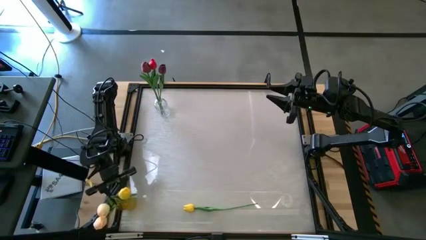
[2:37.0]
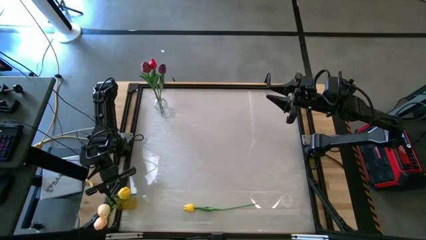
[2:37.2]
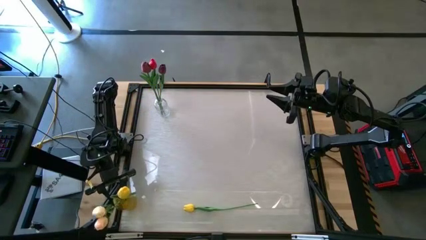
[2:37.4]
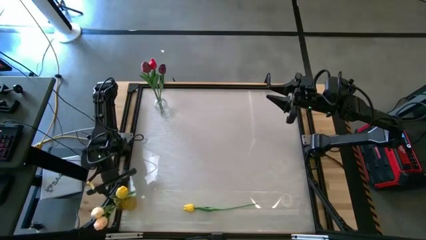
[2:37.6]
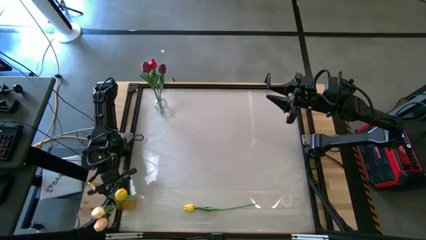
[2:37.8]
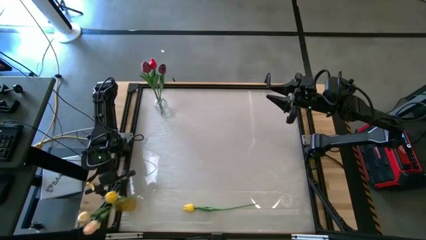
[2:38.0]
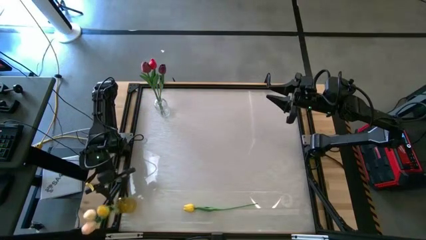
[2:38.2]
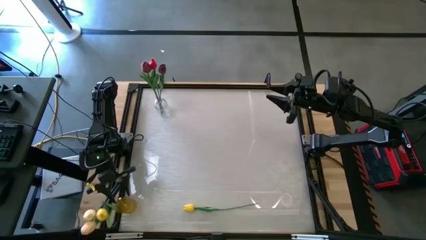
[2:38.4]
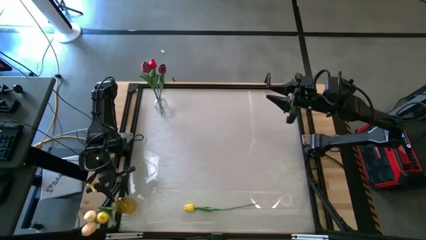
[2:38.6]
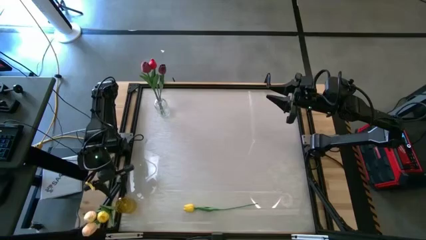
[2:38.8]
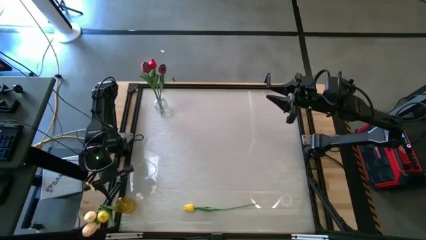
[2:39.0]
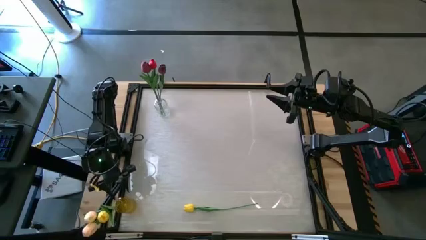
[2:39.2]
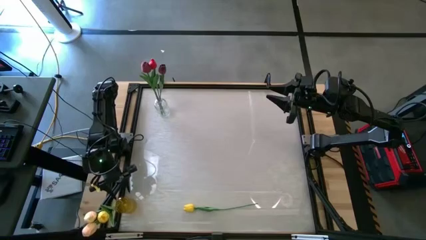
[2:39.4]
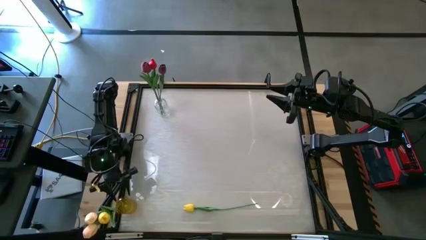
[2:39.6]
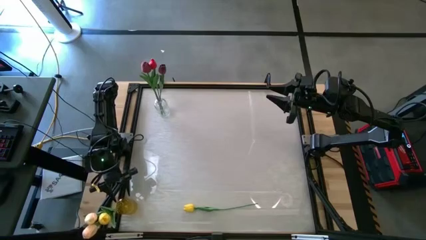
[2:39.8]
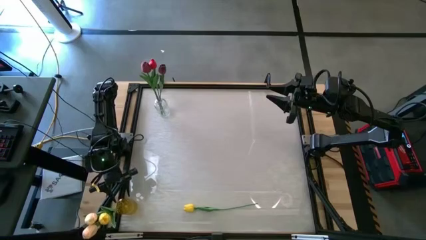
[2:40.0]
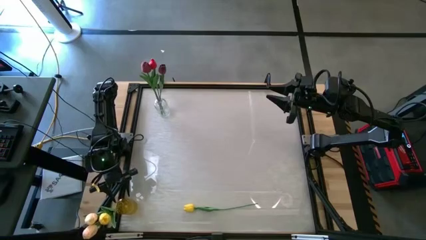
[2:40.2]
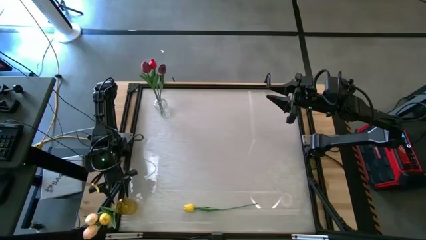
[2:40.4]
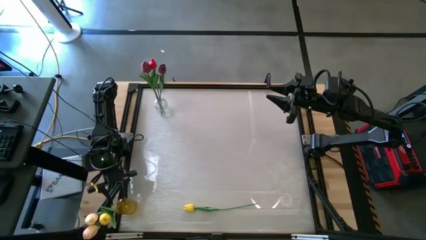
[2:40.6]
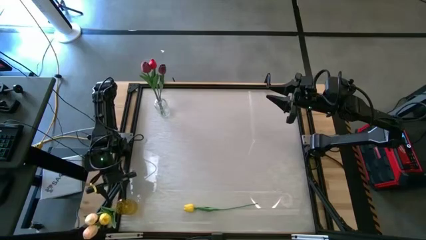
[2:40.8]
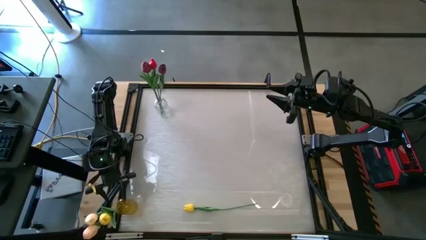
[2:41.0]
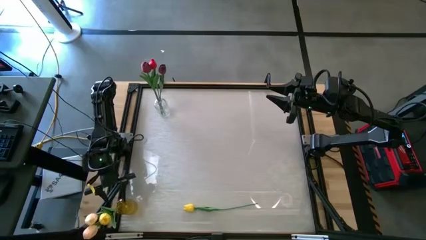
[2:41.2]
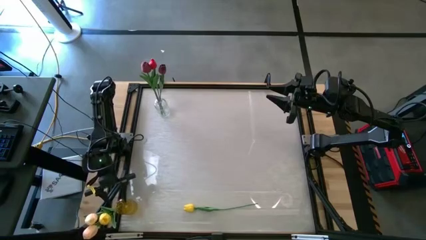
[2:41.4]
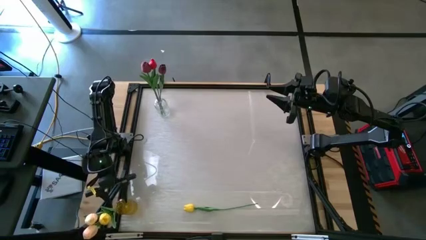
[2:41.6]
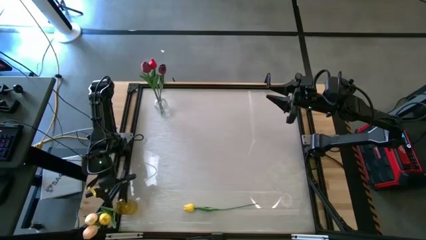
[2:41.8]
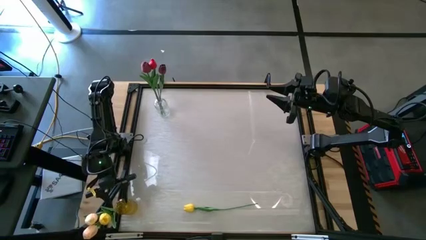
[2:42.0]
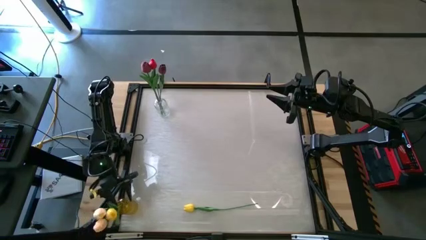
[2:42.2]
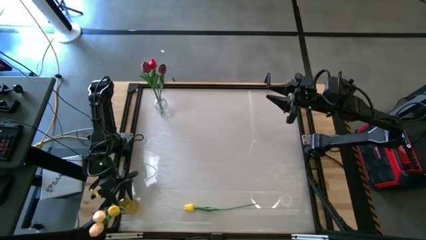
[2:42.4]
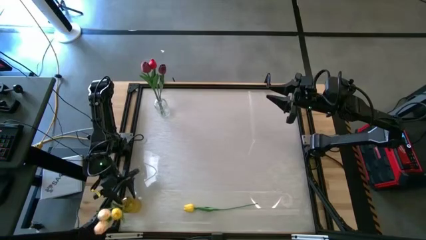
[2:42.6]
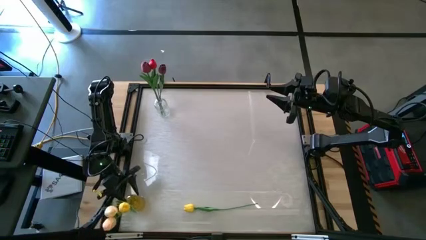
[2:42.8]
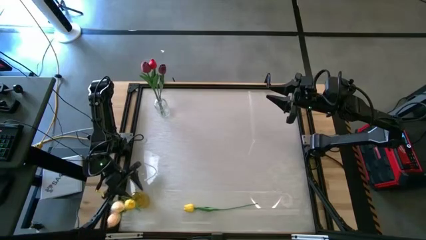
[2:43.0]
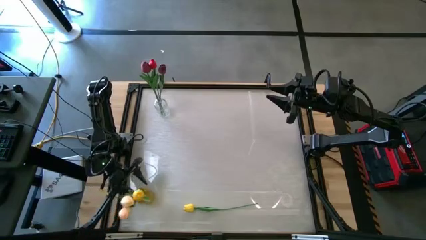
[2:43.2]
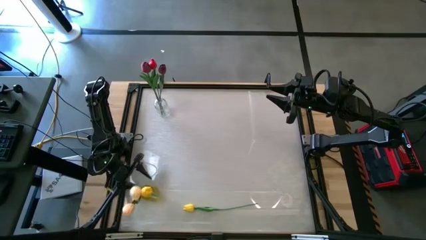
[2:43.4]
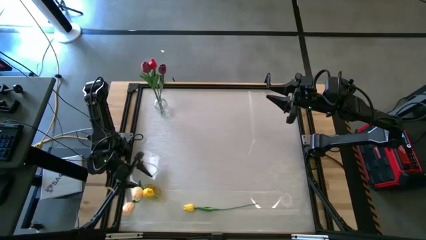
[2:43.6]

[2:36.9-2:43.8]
Task: Sort flowers into vase by color
Adjust the yellow vase

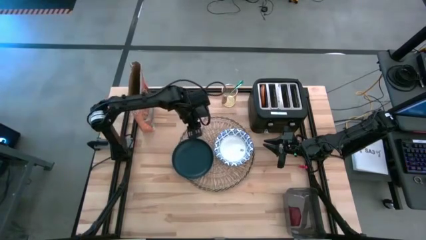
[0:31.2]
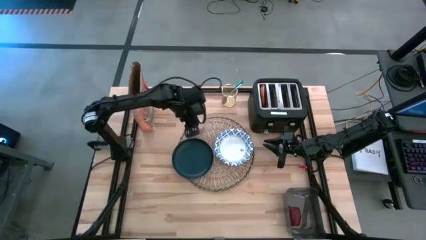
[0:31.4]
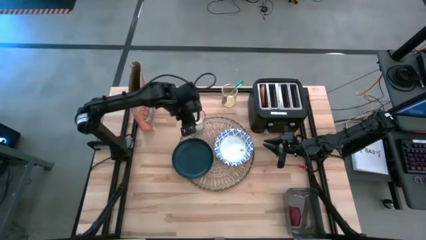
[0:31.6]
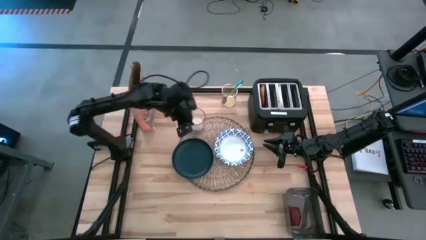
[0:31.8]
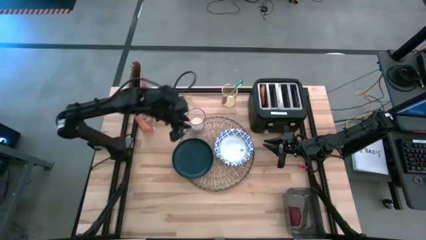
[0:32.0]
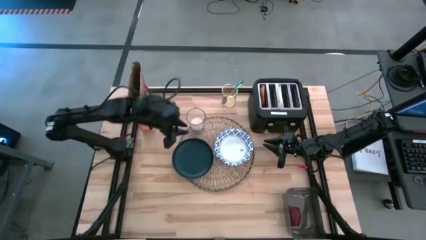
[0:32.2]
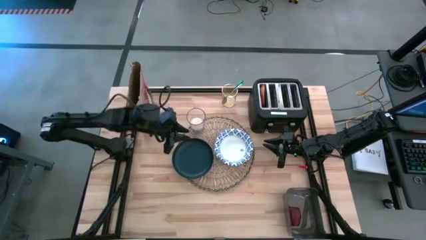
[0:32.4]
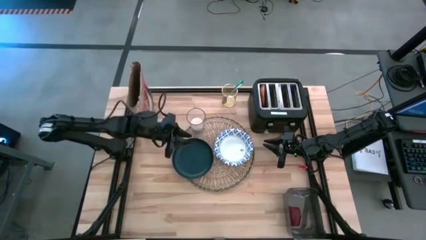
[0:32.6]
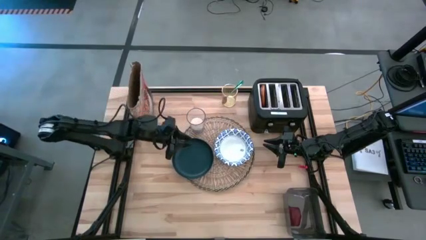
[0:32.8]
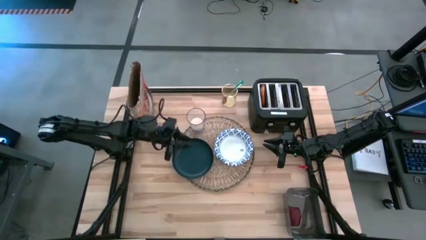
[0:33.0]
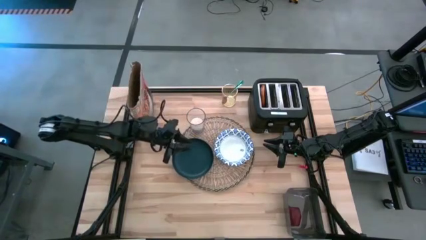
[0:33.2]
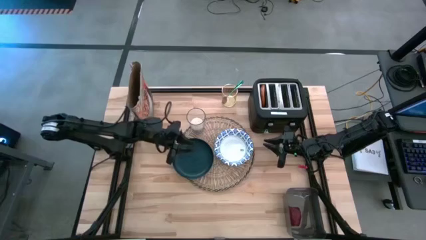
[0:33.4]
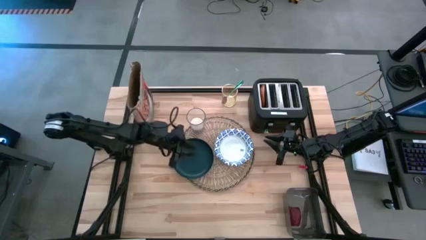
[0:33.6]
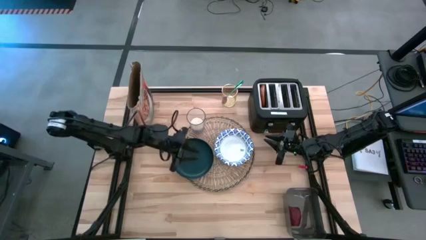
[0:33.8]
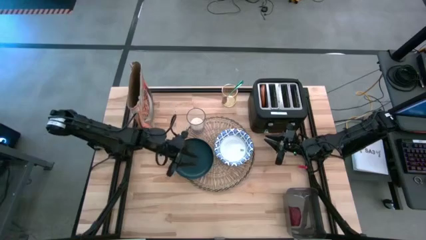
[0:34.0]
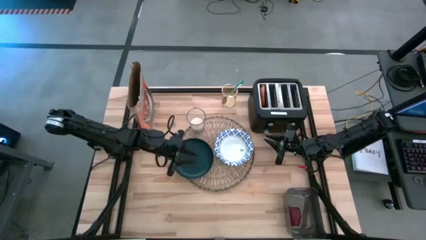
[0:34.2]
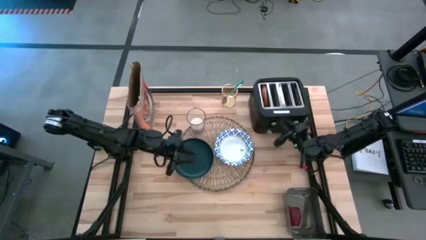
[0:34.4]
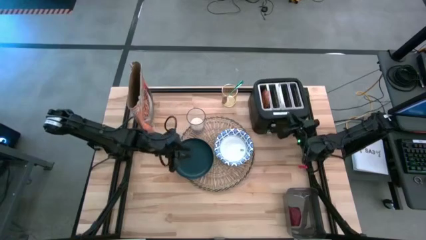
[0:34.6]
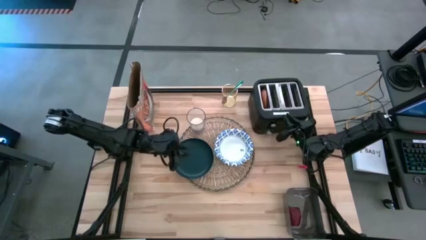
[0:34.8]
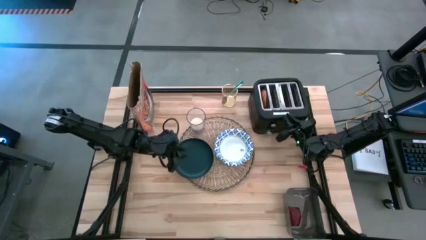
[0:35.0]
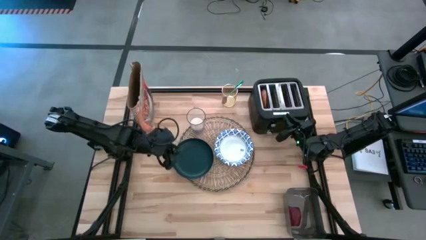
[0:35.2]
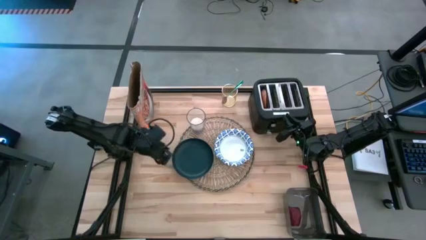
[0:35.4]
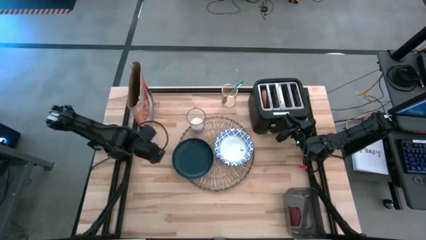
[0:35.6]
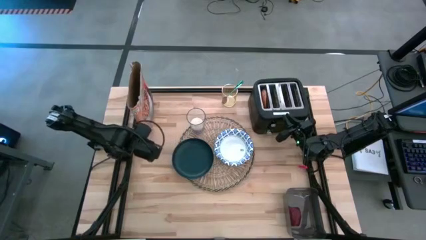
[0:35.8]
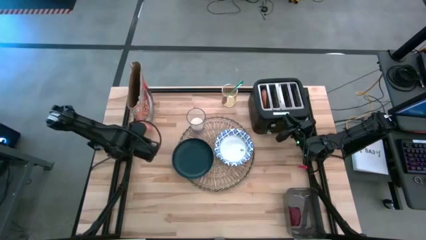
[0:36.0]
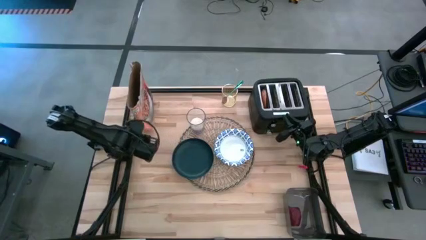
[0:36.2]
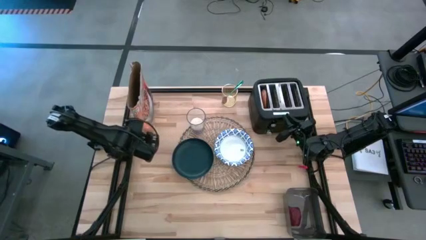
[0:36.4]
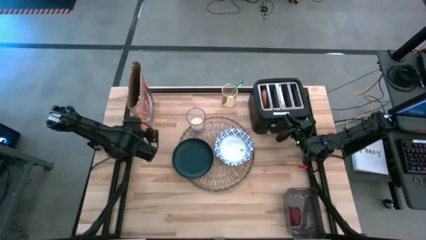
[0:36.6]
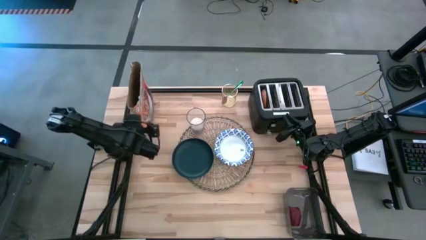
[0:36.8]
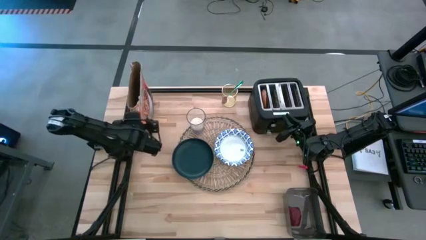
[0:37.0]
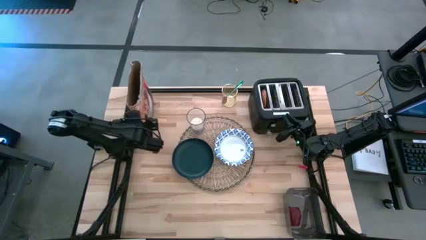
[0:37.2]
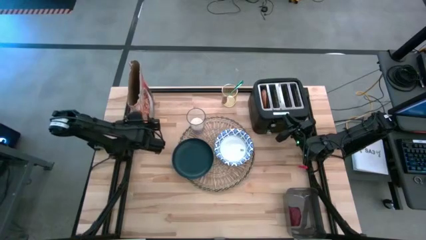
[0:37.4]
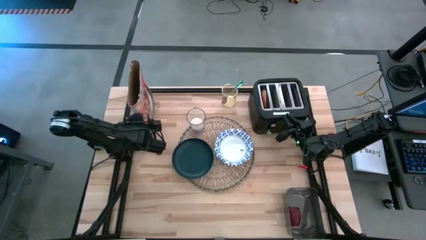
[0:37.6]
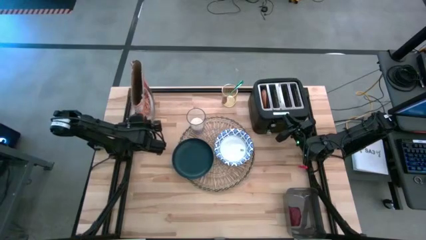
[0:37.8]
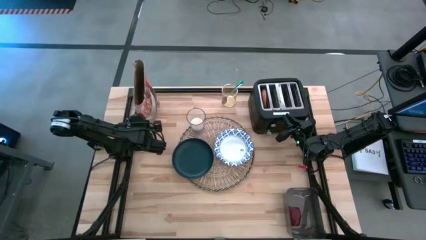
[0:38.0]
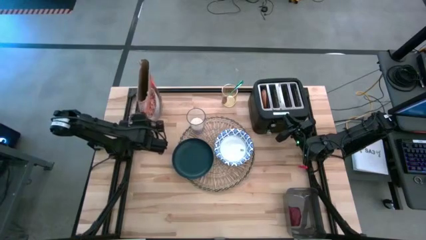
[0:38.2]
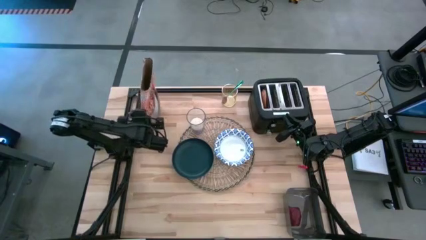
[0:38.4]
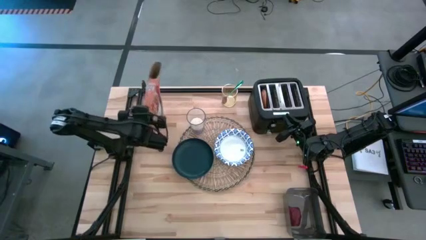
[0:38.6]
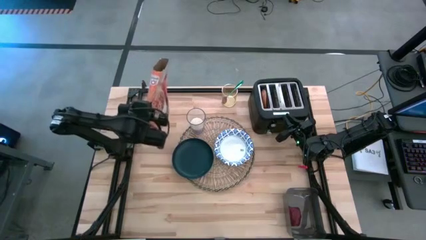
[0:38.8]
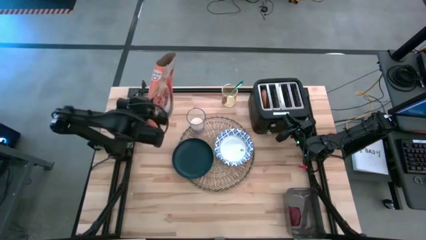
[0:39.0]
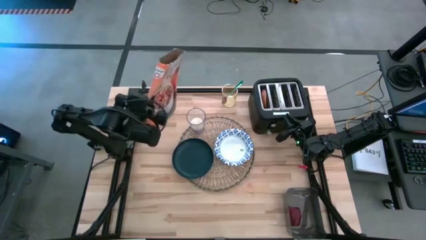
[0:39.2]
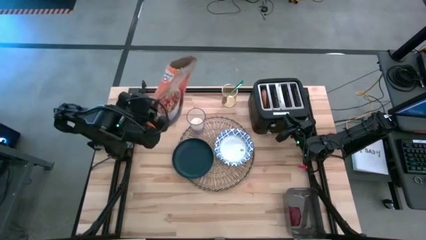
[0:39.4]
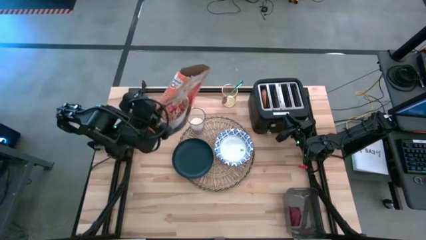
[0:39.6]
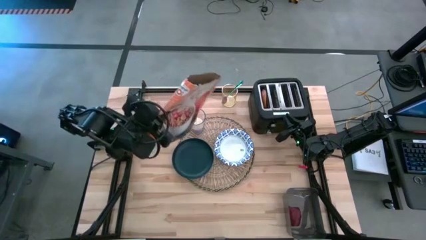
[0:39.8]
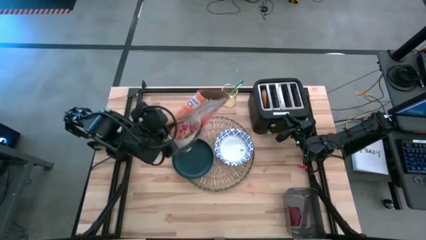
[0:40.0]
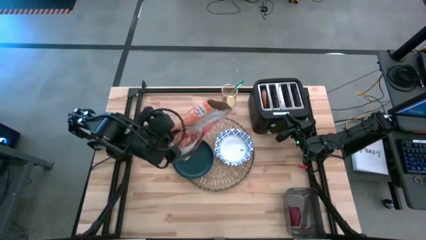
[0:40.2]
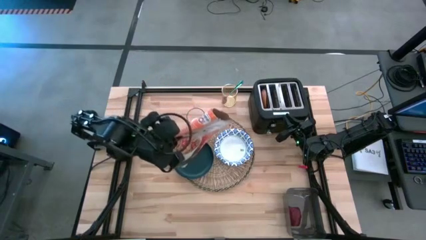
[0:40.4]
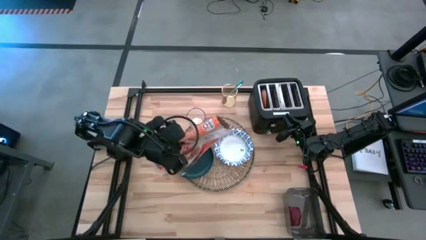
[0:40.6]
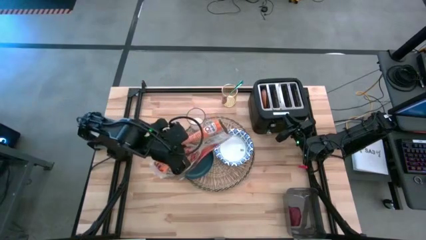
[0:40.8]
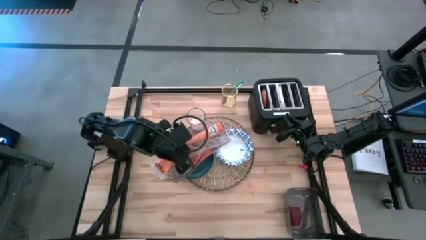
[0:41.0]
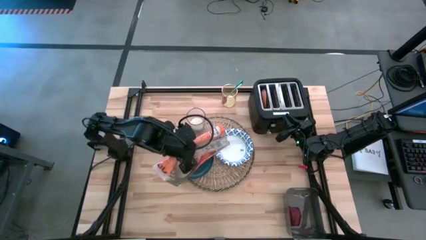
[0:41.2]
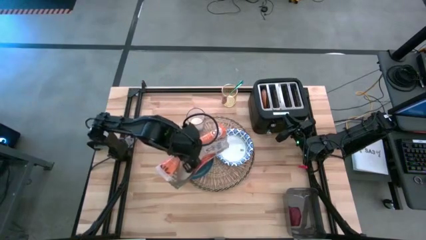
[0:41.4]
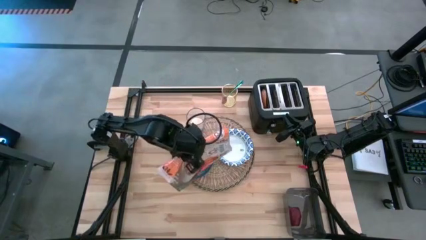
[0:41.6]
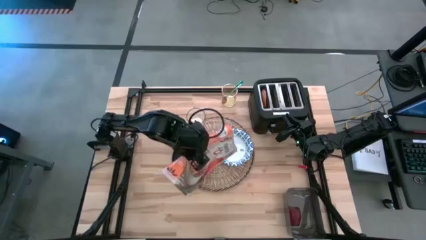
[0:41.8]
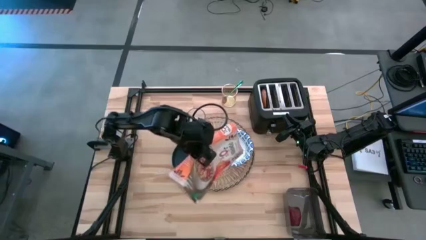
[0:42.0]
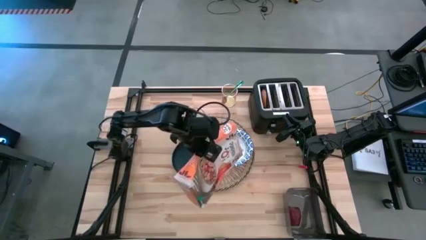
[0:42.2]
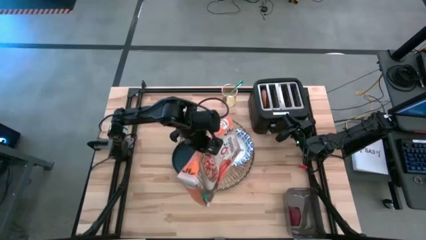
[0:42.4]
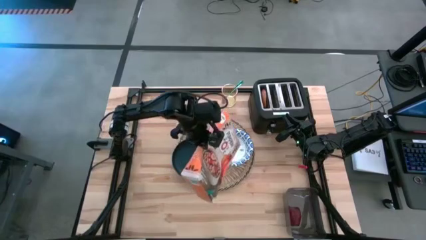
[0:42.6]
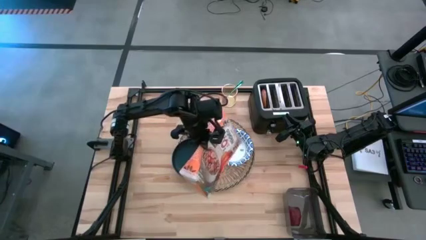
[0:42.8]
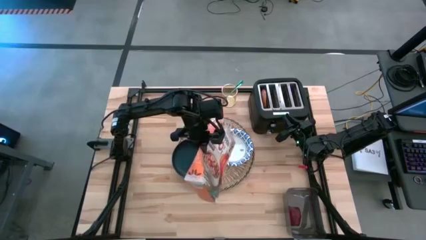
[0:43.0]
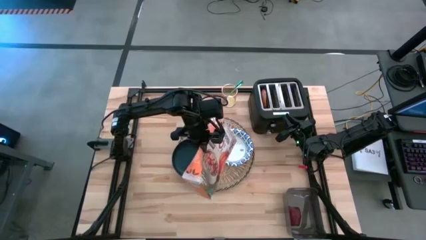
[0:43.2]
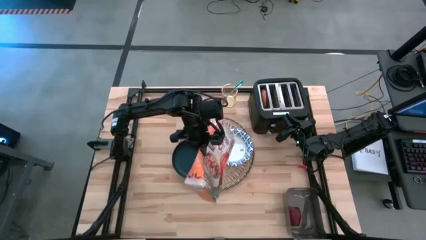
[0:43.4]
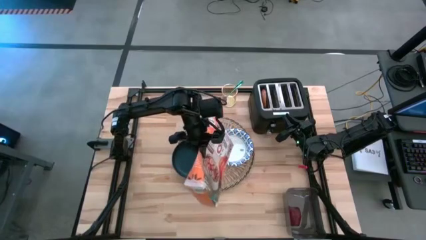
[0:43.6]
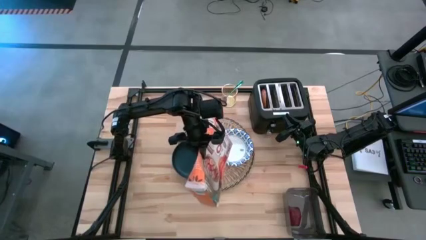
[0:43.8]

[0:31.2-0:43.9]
Task: Arrange a breakfast setting
Pour the cereal from the orange cereal box into the white bowl on the brown placemat
